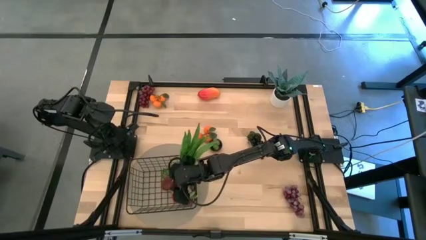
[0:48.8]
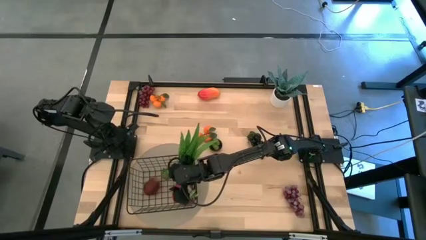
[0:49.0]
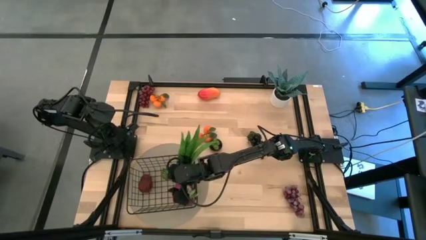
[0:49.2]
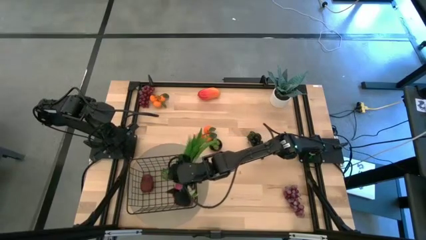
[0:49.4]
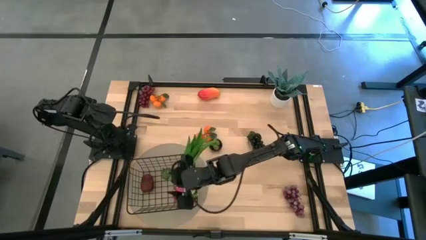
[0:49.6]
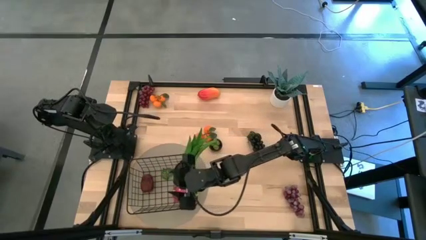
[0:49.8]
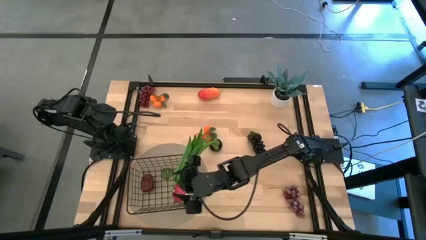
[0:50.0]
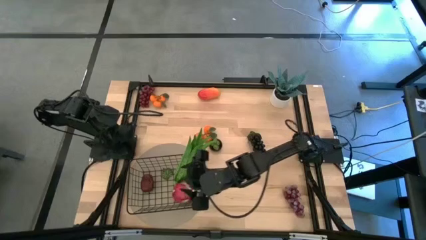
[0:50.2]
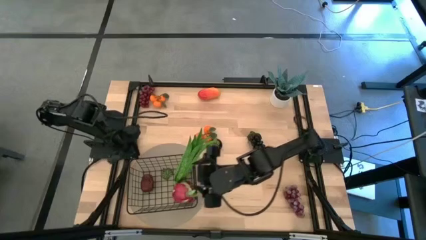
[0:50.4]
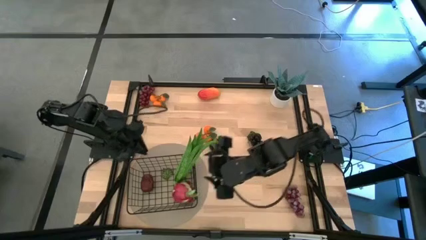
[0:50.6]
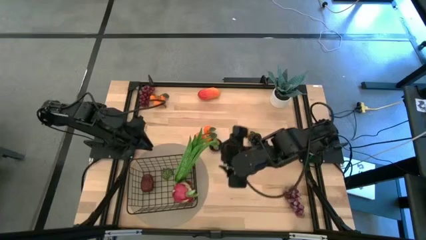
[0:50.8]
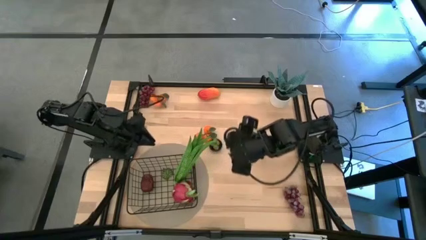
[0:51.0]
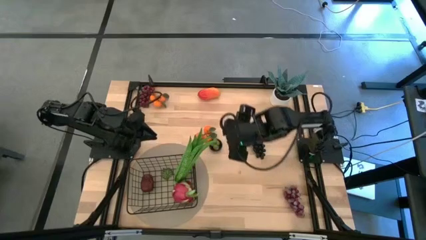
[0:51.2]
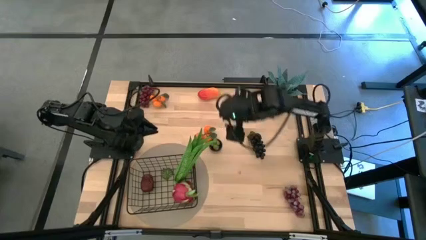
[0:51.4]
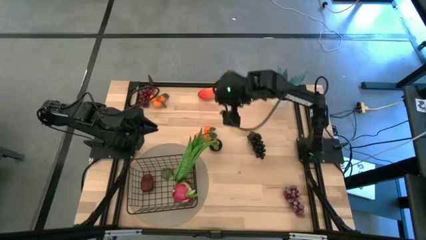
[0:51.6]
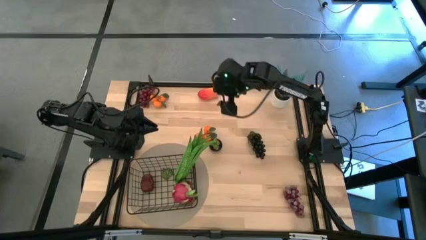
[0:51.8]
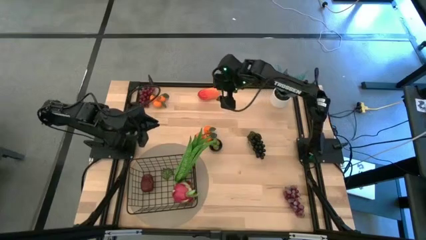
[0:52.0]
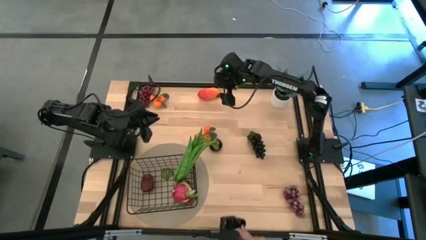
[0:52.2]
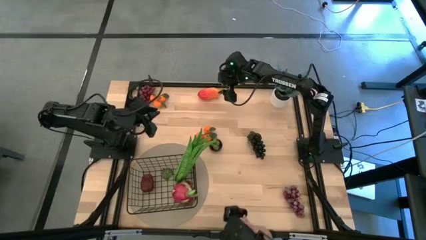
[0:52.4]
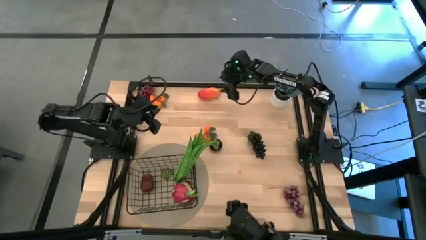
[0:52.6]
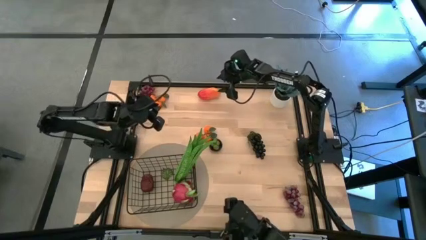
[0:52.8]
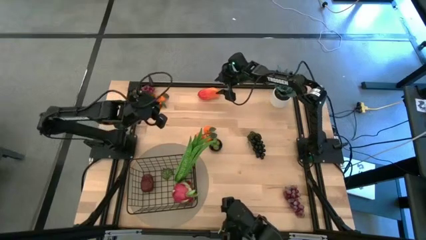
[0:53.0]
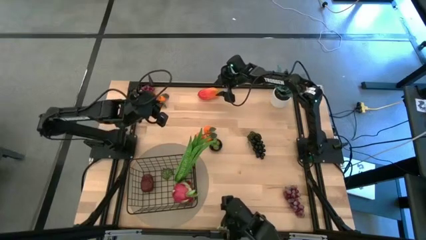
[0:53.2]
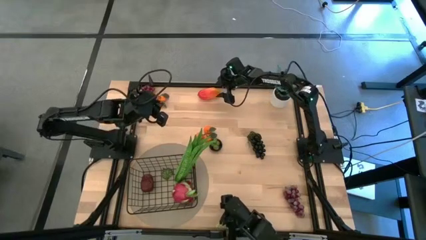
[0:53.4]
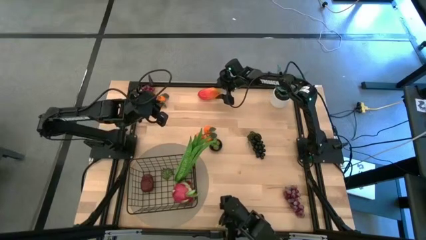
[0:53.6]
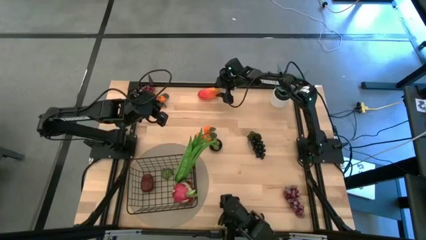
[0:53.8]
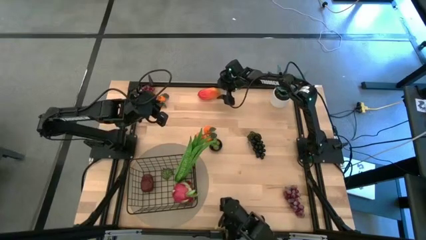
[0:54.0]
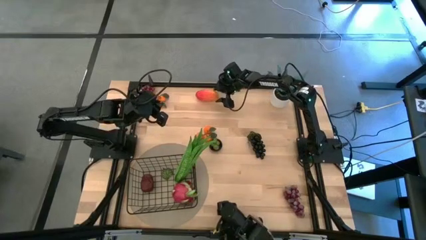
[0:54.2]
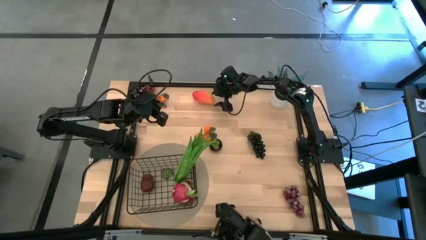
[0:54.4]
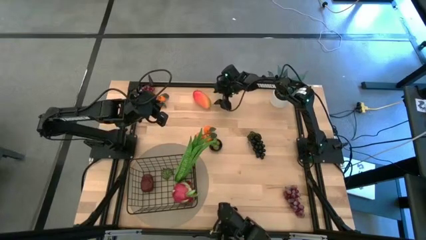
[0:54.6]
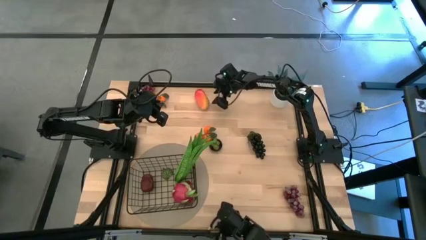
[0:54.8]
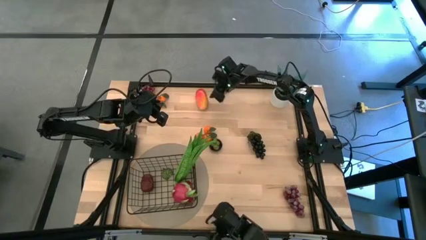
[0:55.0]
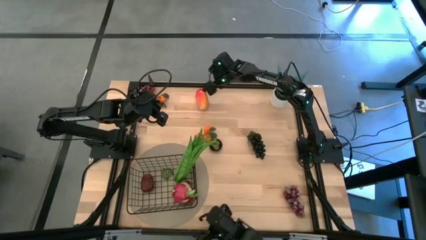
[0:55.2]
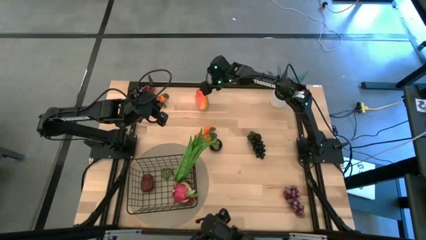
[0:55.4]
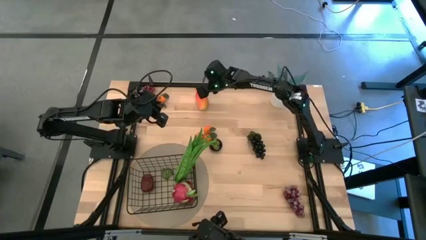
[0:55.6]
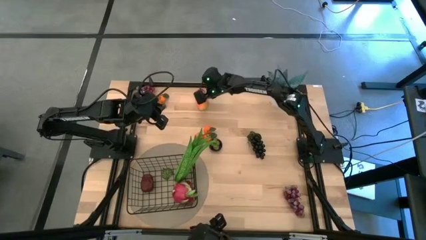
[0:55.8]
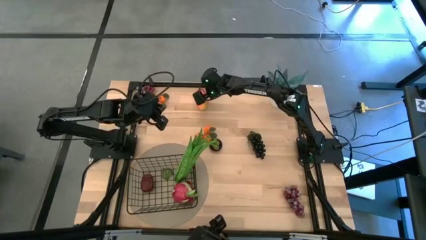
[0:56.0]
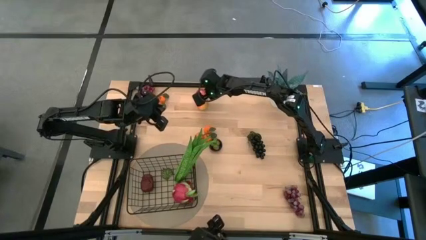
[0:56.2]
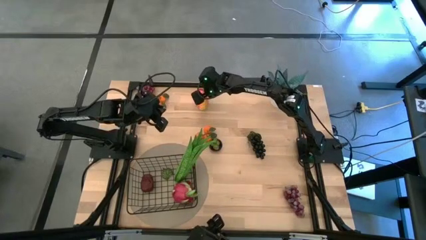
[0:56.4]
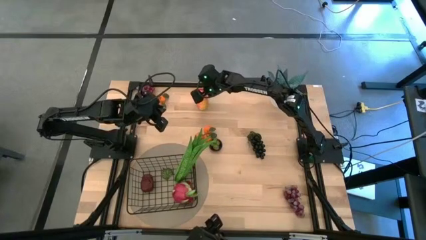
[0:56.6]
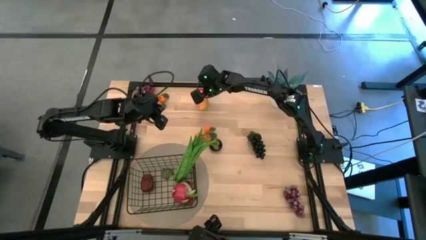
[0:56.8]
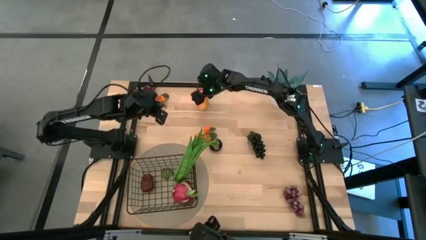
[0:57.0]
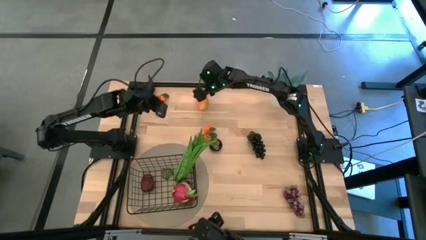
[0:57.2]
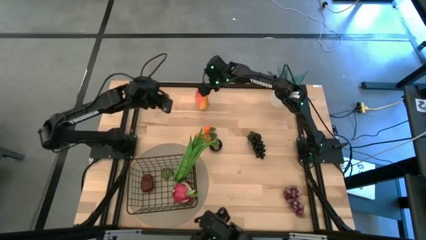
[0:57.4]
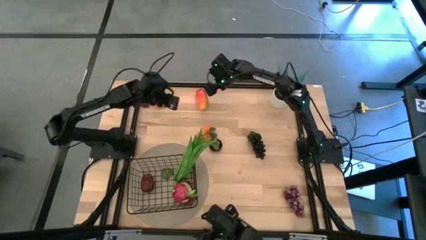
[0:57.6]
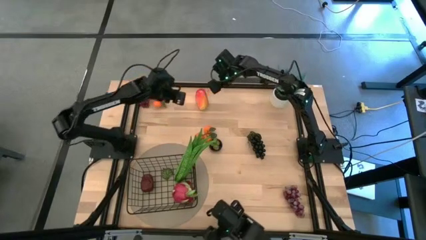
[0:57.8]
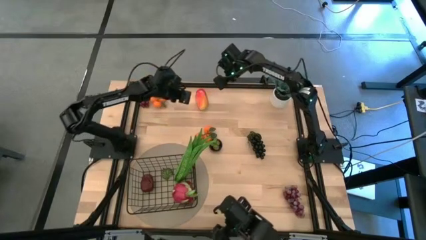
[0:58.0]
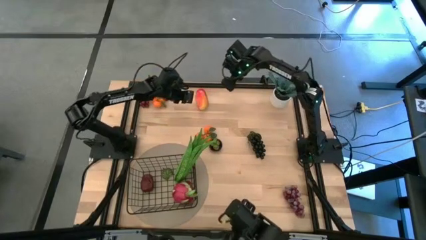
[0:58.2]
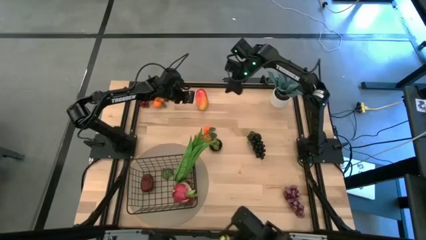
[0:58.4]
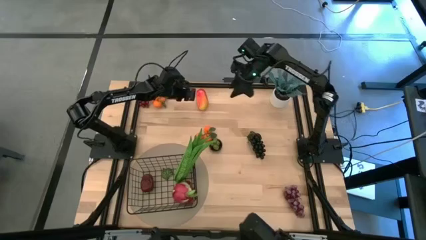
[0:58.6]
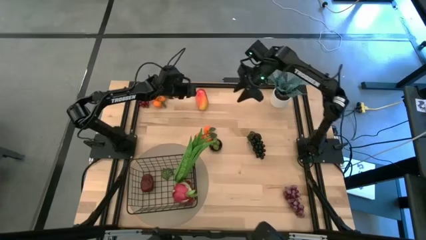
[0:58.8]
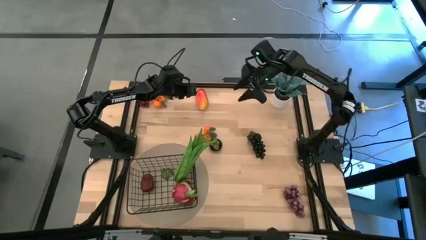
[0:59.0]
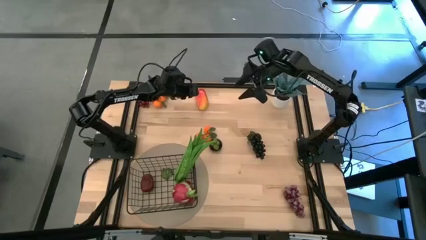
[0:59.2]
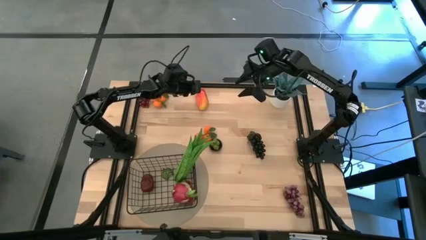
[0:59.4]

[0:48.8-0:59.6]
Task: Build produce basket
Put the orange mango into the black wire basket

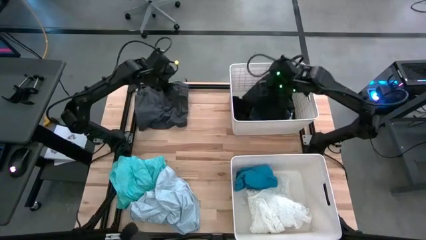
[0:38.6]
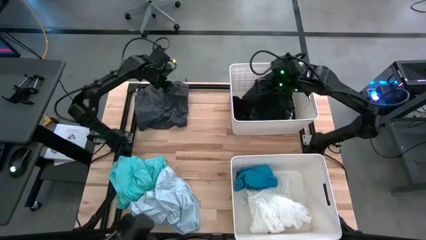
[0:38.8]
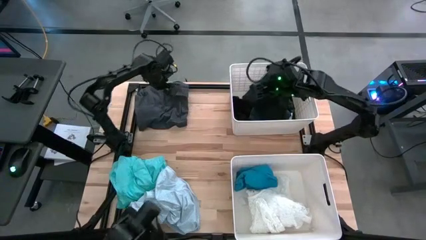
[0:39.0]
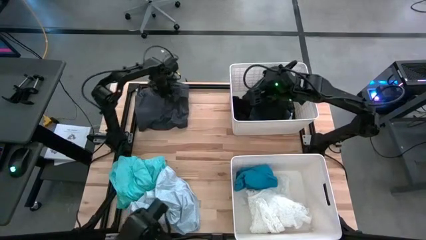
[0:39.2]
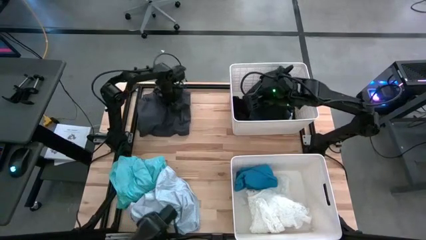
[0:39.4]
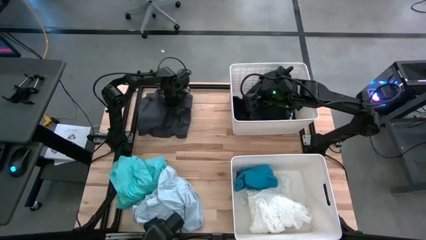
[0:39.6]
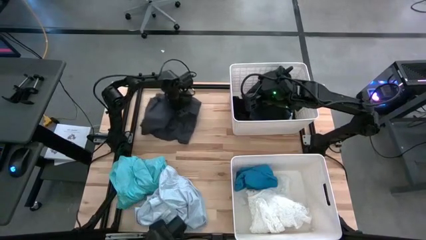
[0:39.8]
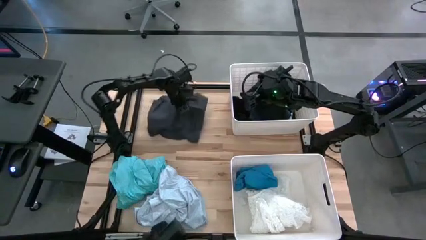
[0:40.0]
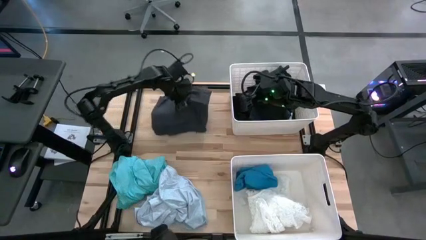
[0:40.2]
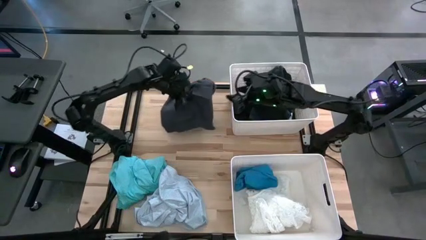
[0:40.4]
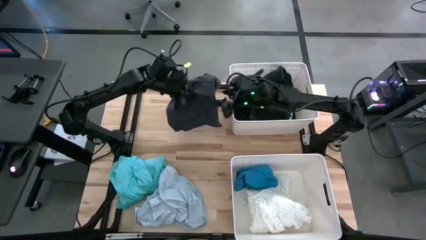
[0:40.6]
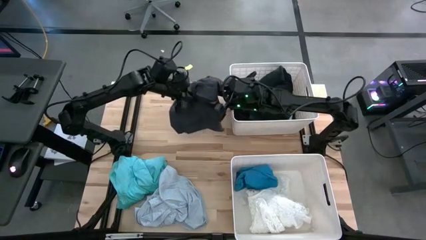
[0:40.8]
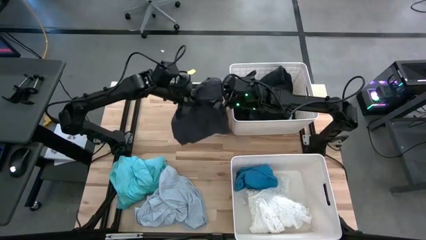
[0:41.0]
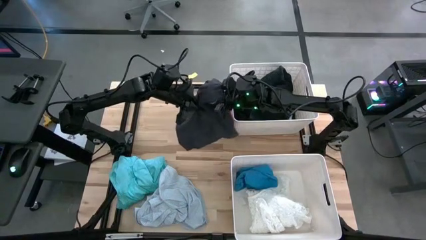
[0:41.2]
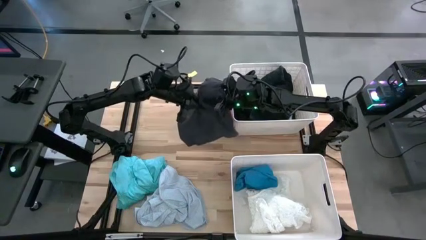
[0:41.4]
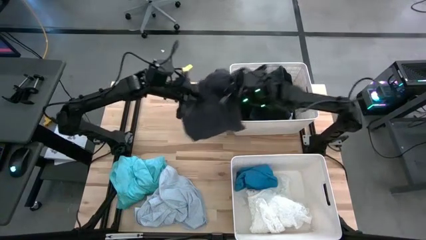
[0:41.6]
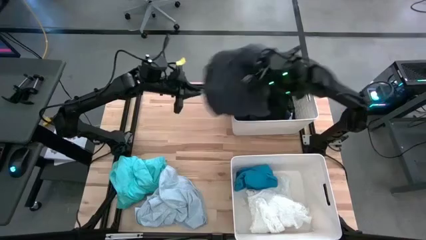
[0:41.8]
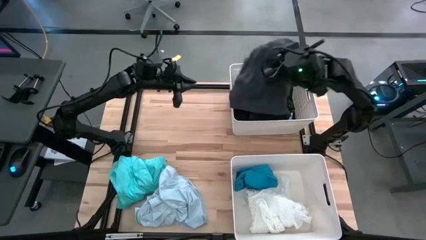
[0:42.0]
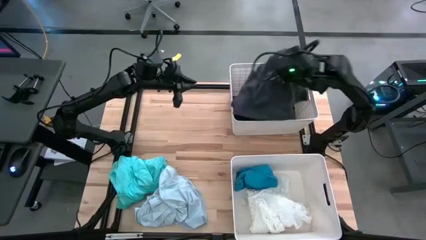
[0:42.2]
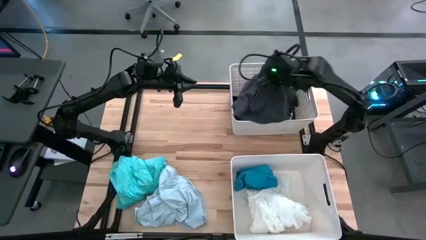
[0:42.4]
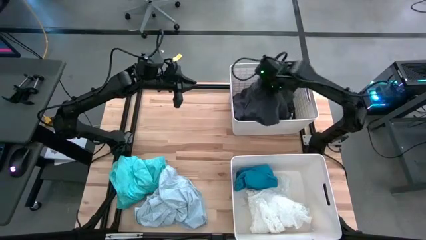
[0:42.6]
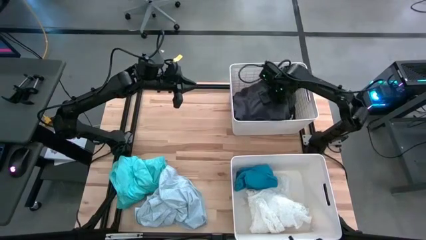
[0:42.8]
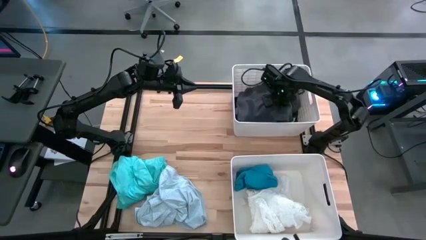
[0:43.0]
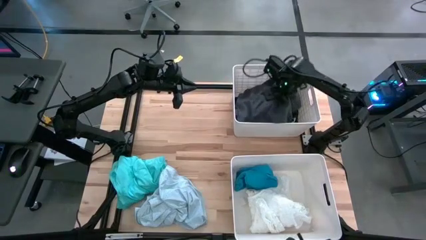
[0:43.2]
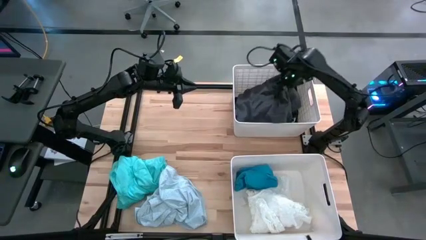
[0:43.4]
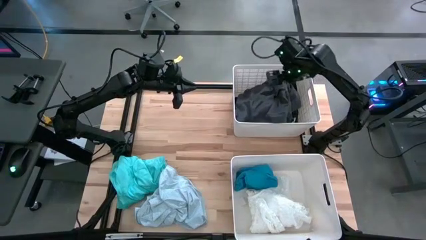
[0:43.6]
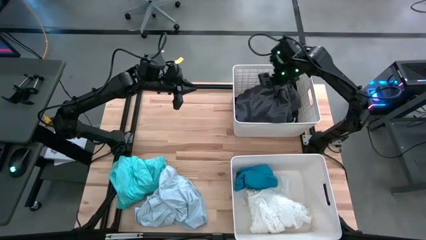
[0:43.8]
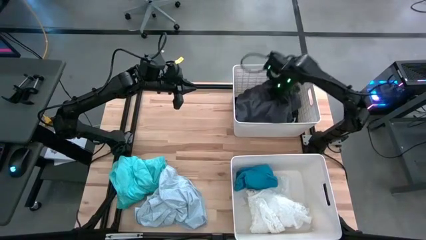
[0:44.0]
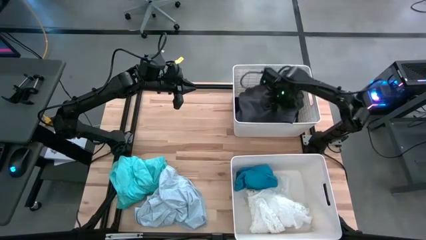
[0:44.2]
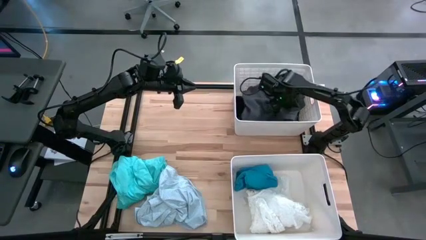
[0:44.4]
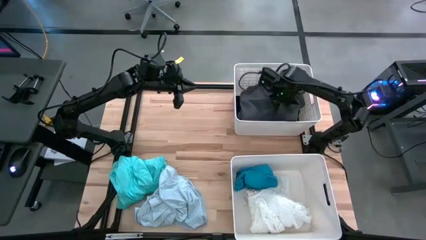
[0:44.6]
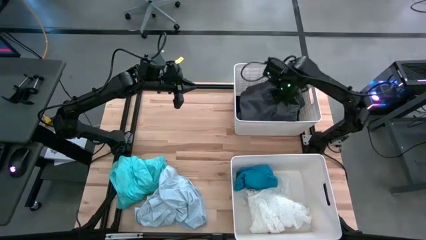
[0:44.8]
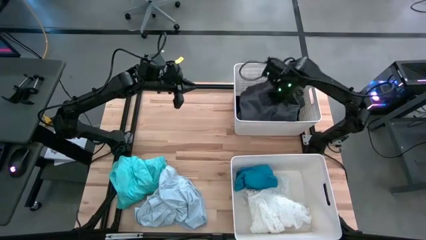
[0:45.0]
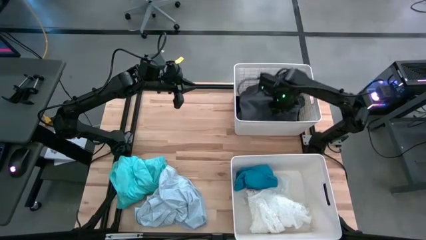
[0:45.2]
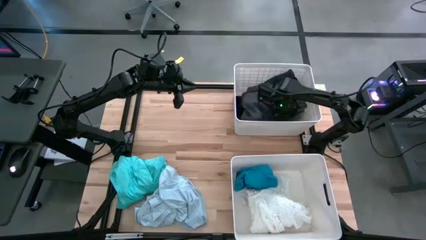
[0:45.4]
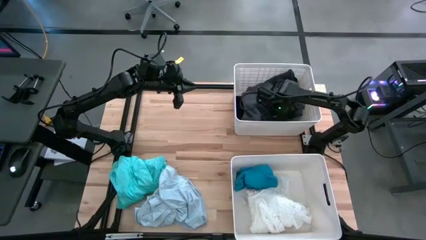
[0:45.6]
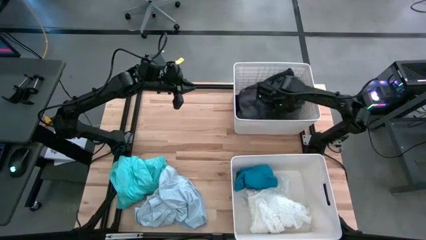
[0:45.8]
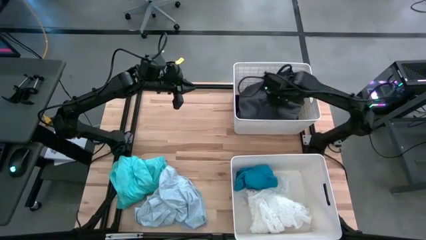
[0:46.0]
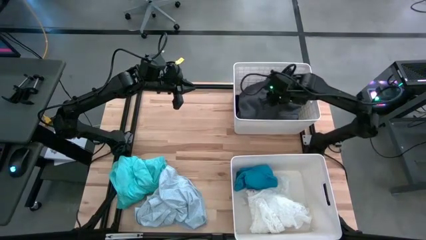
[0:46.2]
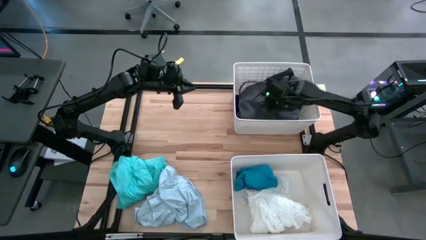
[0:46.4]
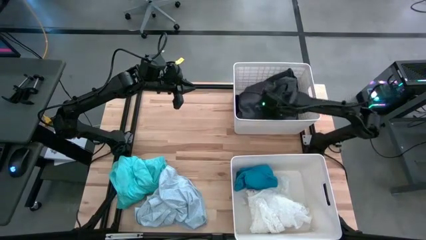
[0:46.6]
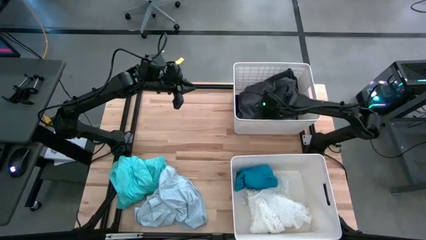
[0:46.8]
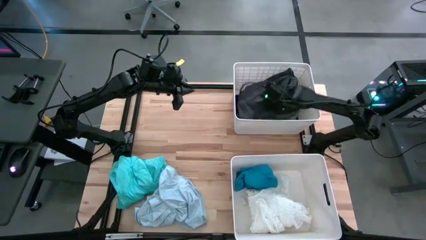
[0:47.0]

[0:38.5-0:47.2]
Task: Sort clothes
Put the gray short into the top white laundry bin
